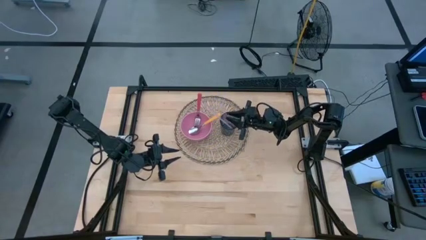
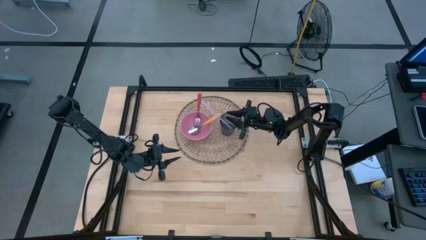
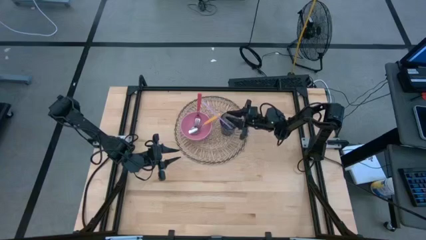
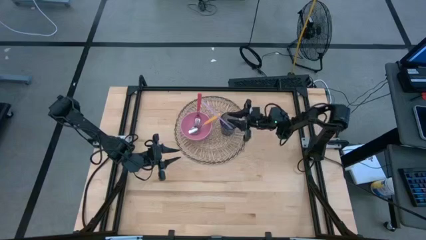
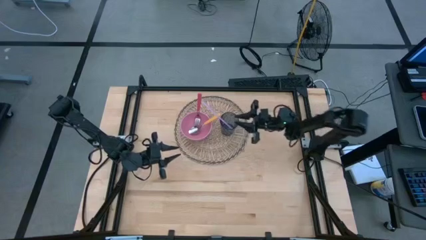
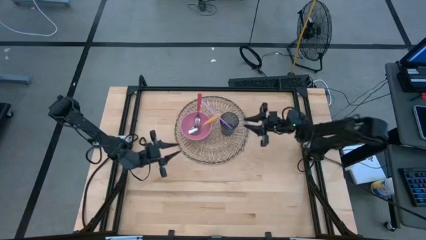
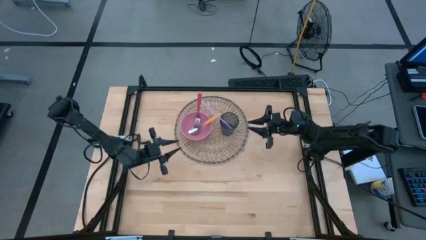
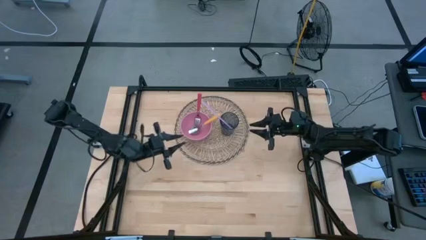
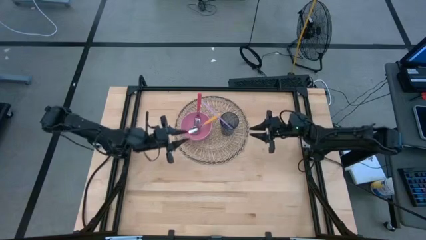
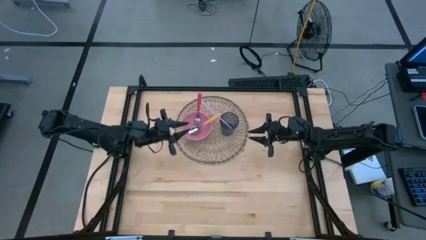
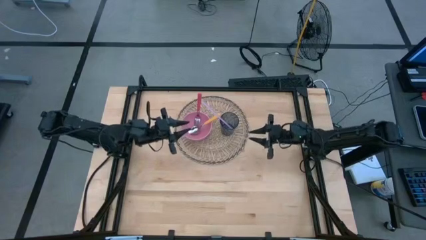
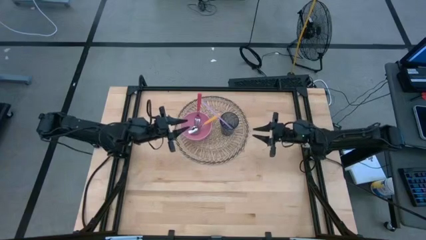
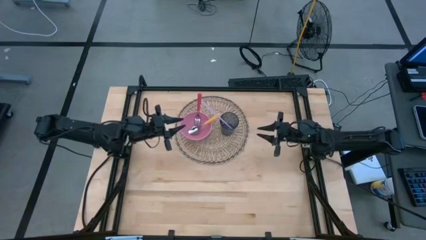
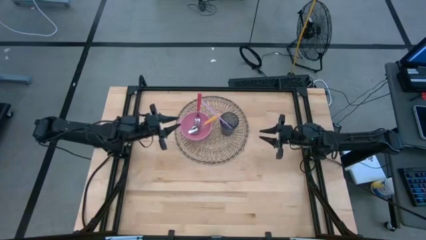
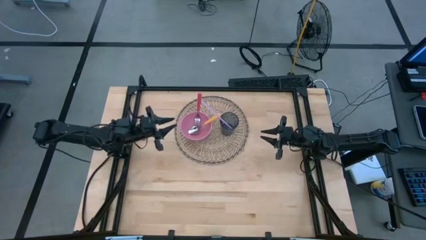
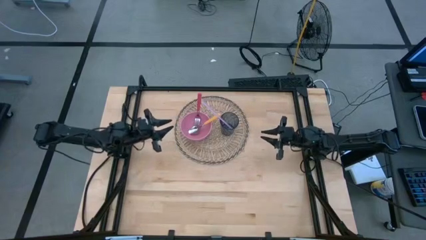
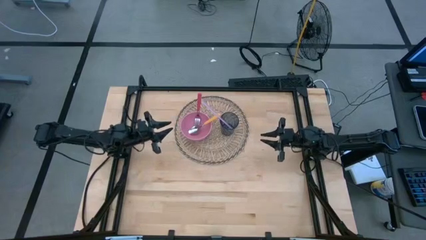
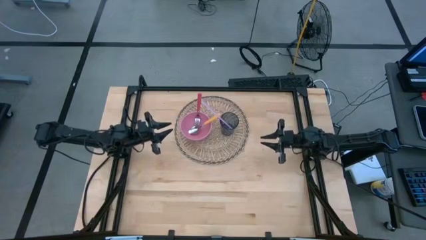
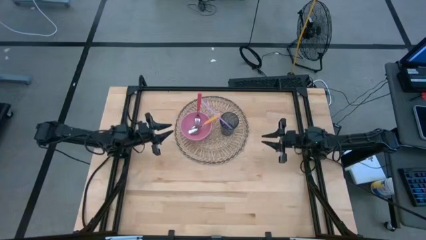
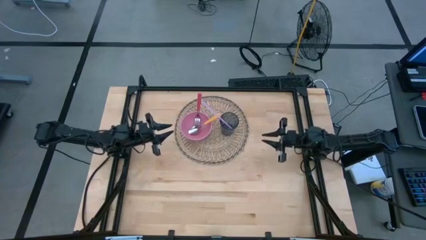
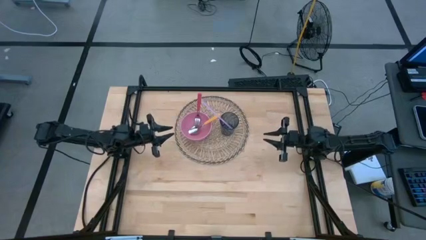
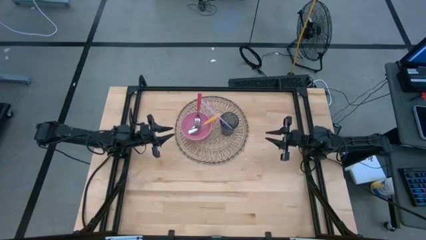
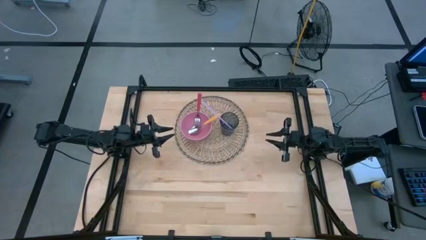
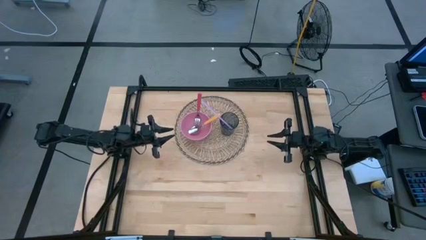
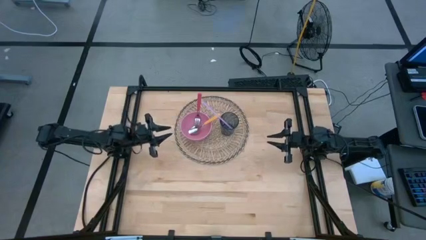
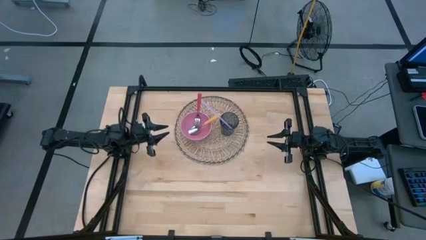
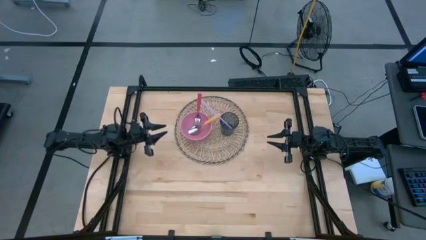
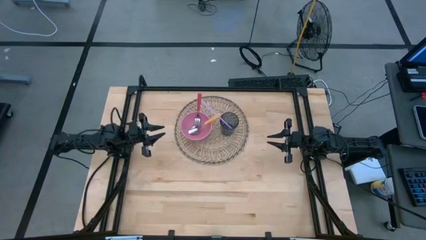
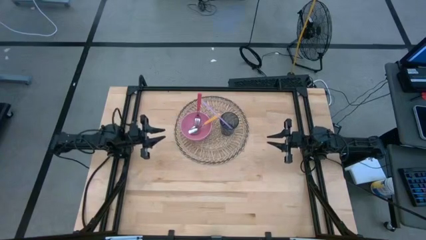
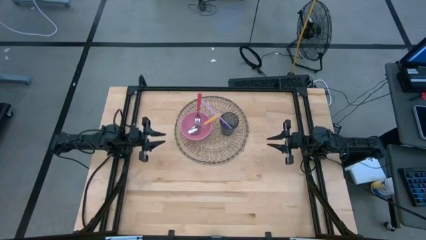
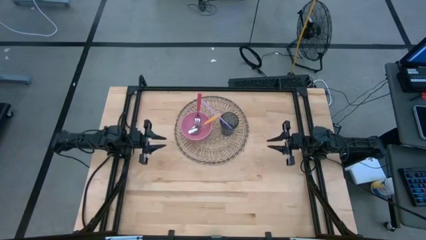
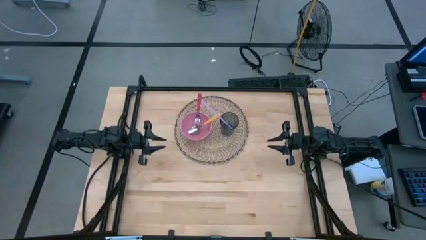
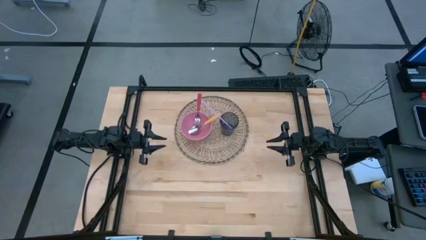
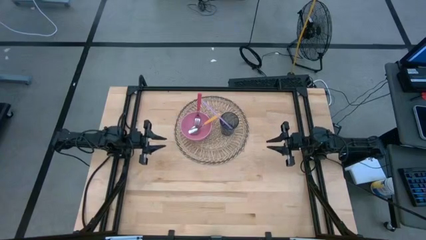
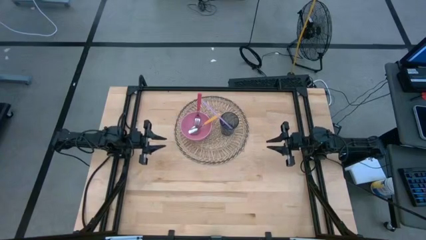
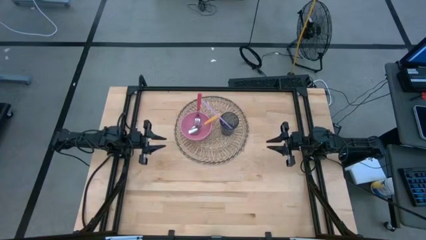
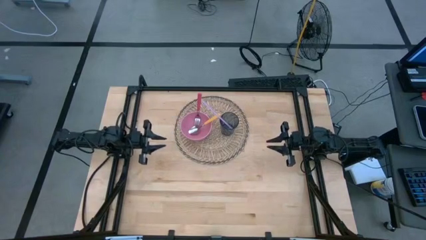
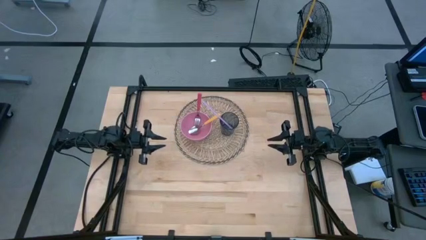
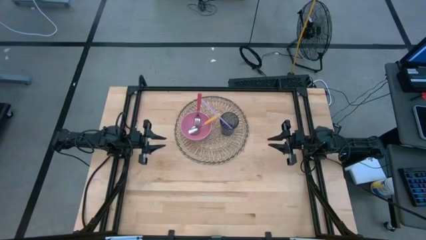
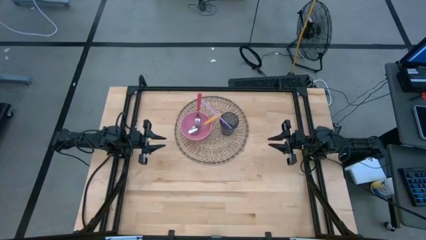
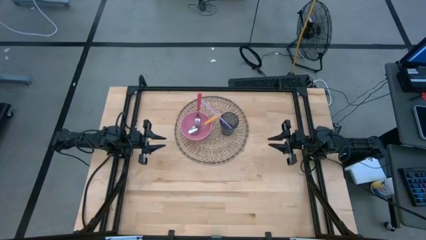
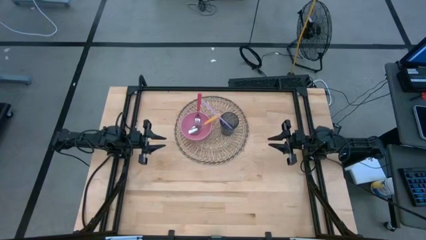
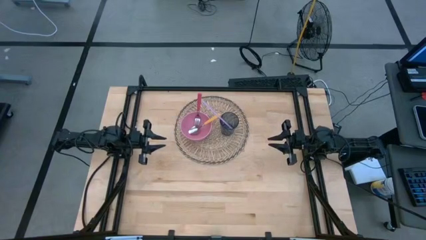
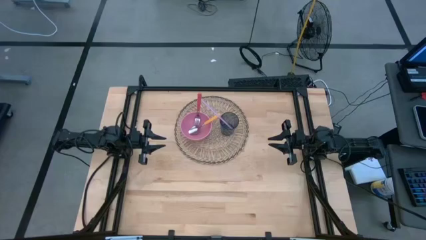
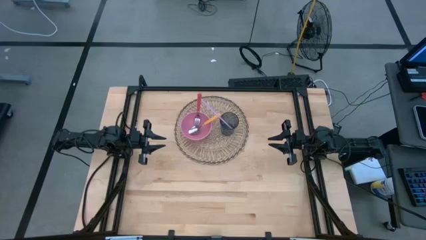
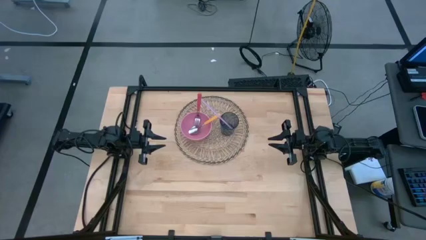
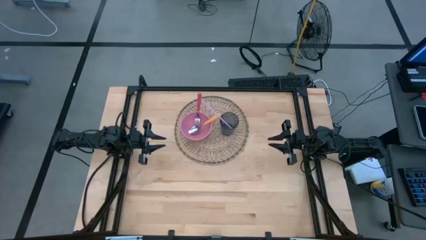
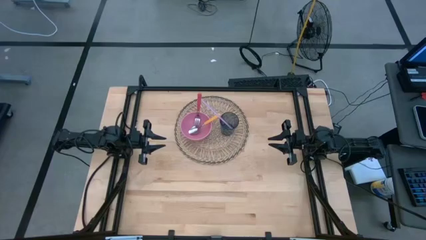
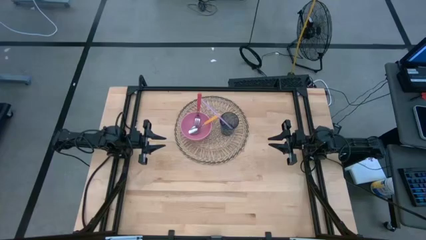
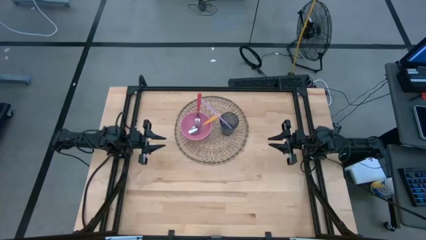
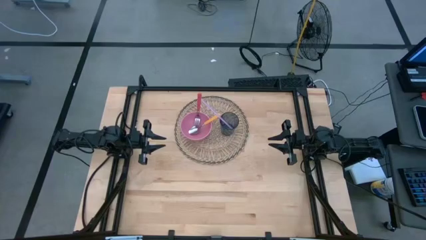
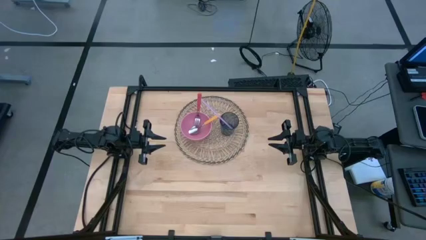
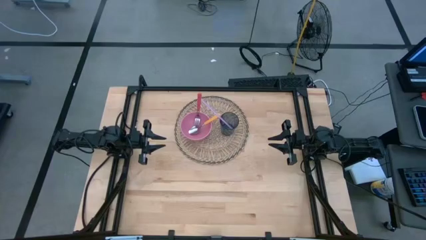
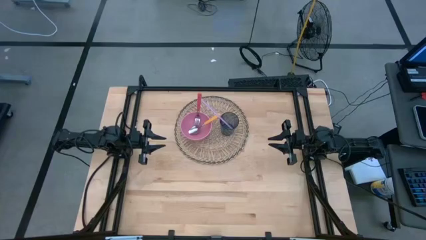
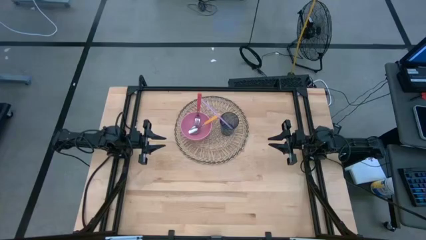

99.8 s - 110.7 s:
Task: Pick & Place Utensil
Return to Home Position
